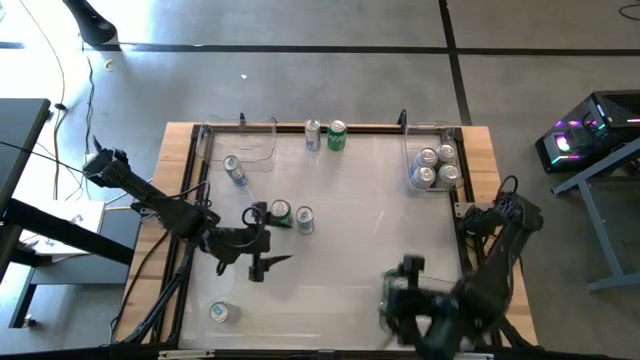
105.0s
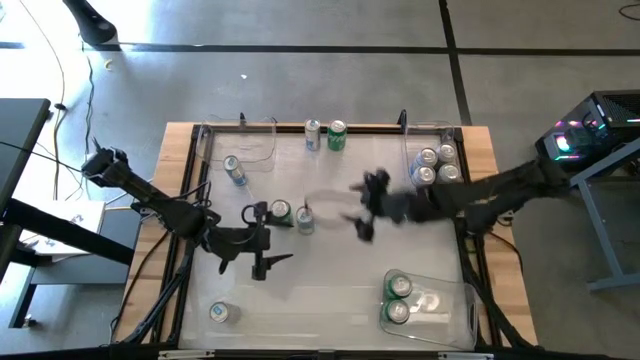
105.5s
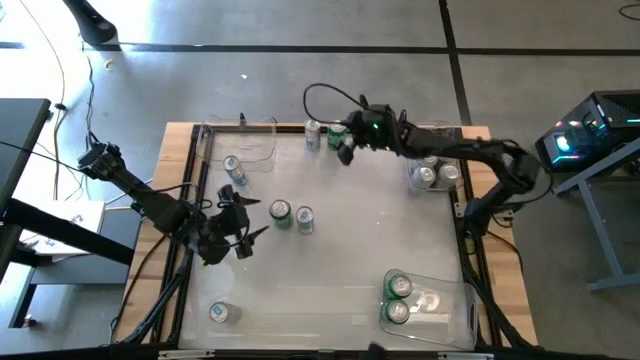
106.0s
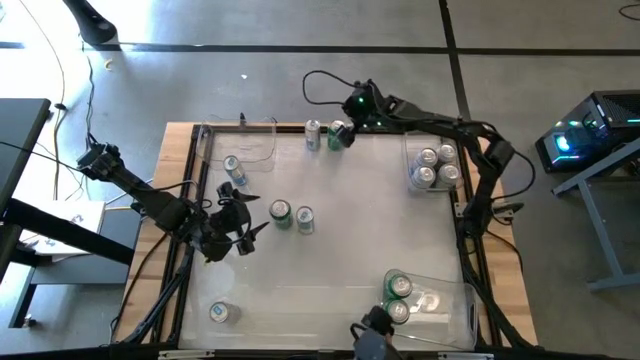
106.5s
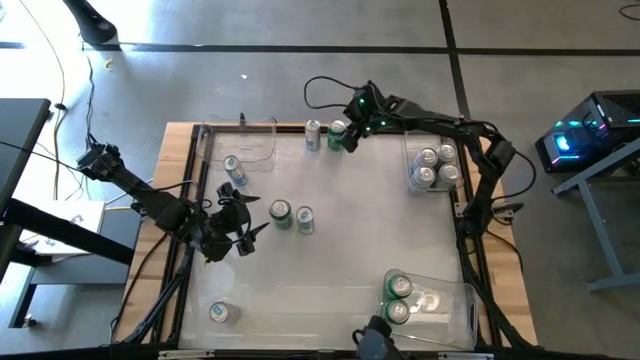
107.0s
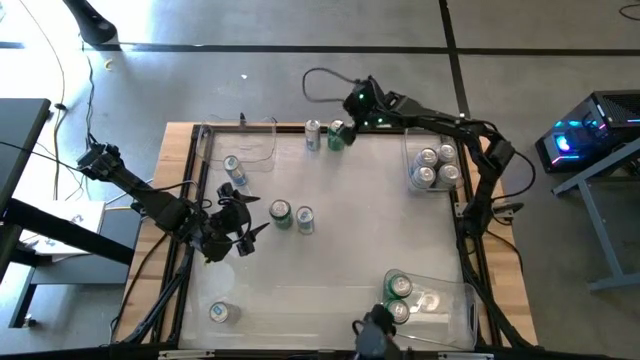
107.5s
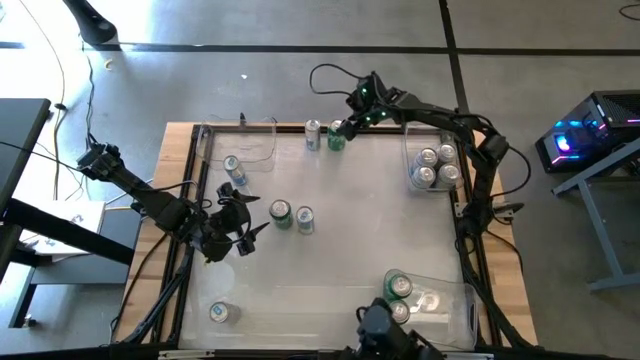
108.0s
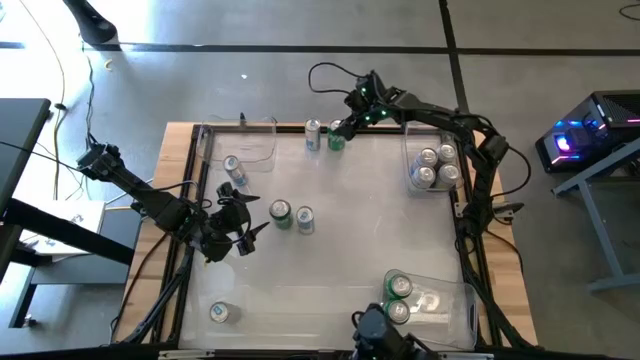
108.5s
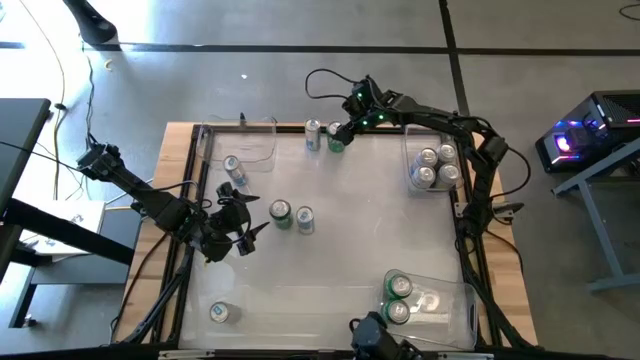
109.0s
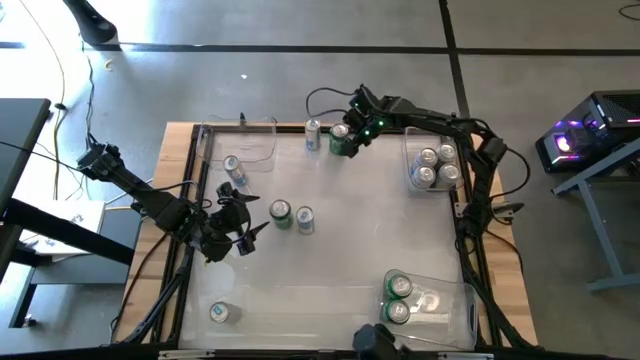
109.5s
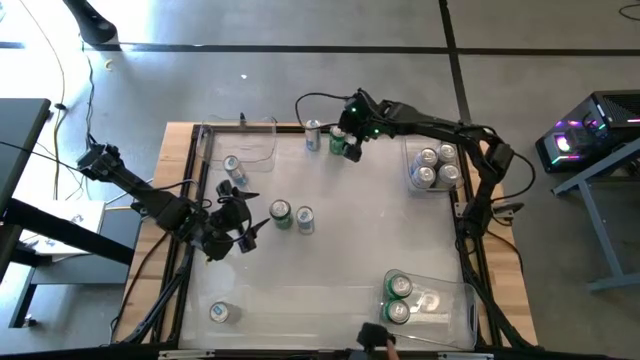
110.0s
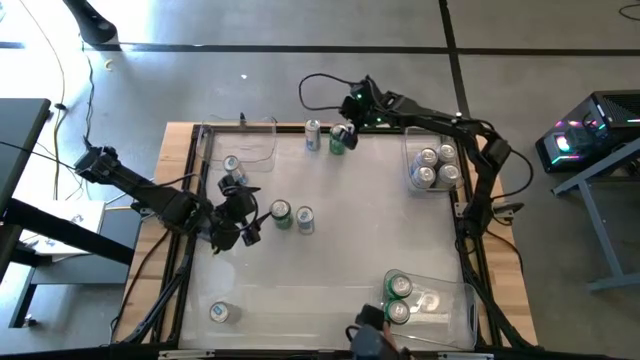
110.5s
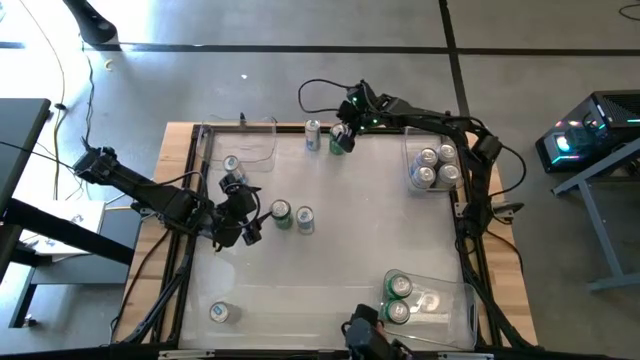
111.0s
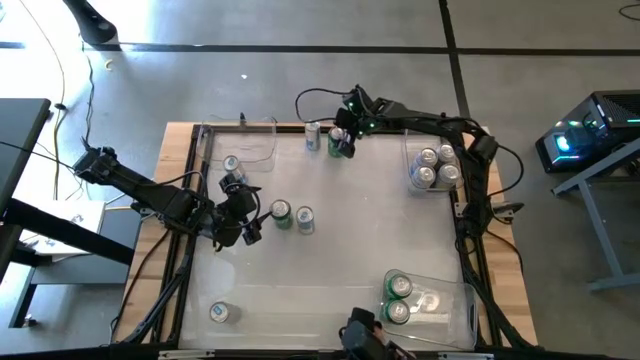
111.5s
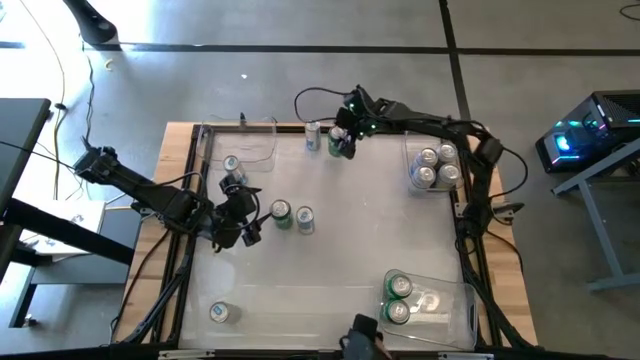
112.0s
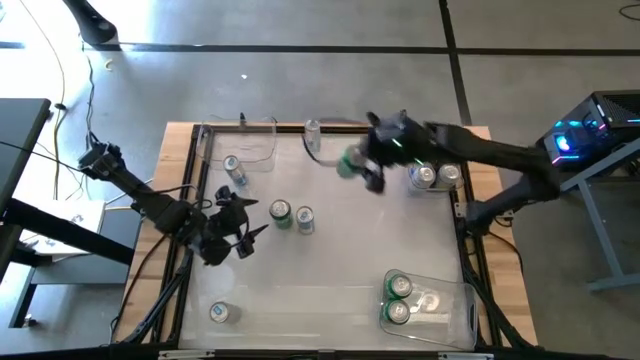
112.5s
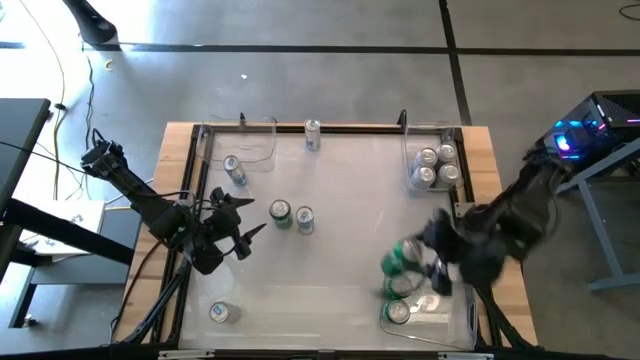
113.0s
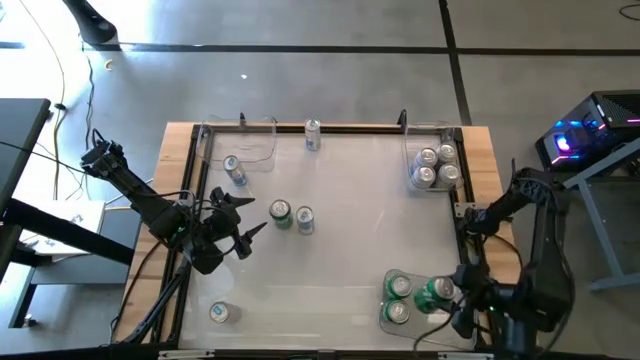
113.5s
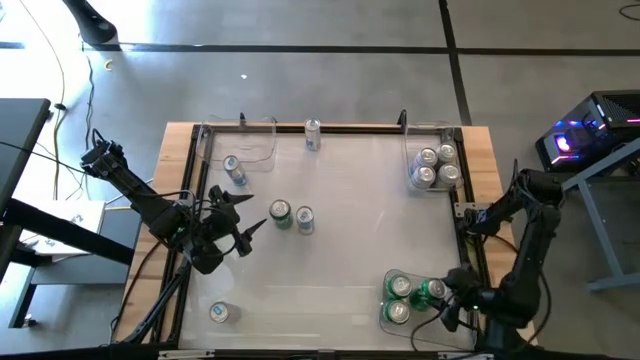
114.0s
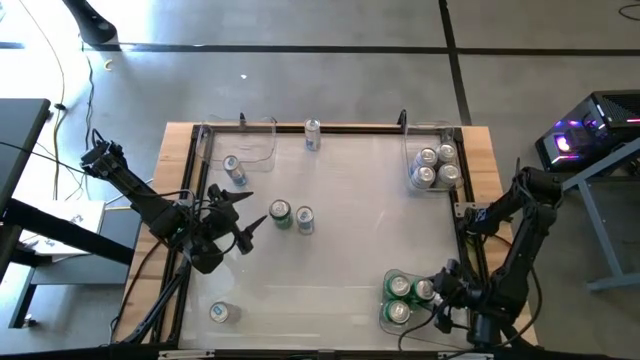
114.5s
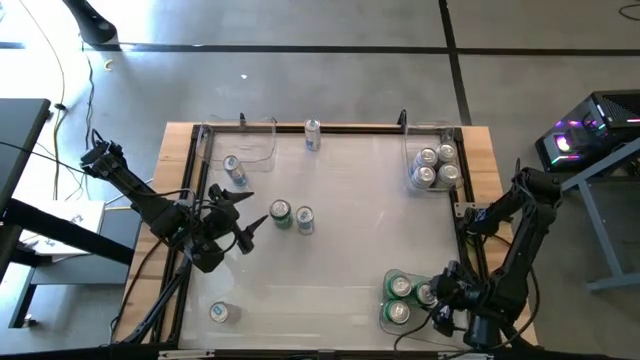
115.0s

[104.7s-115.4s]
Task: Sort soda cans
Put the top green soda can into the bottom transparent bin

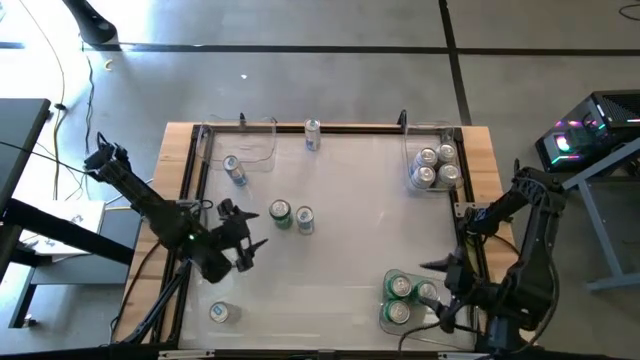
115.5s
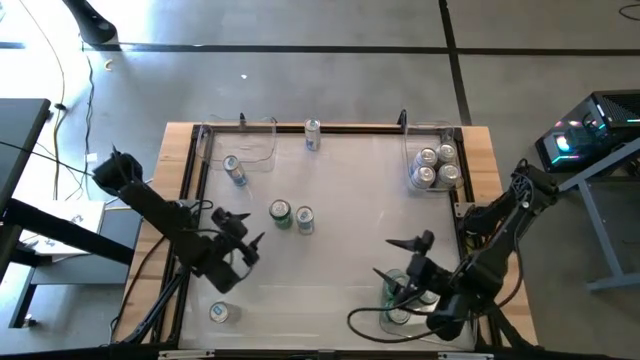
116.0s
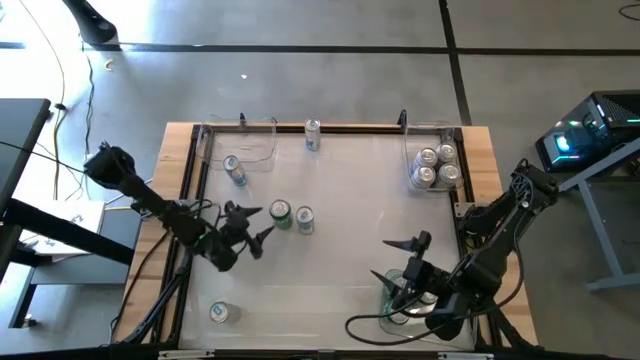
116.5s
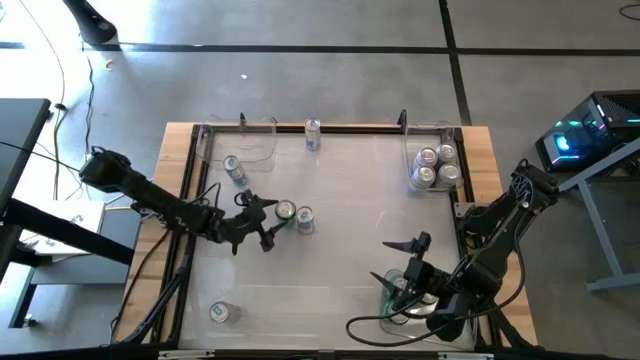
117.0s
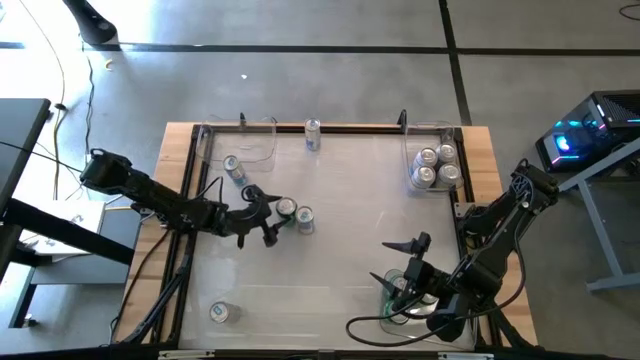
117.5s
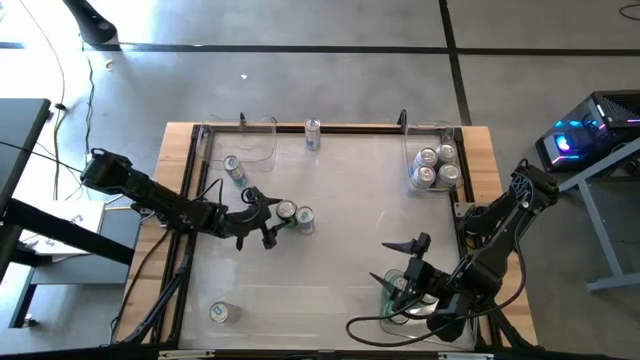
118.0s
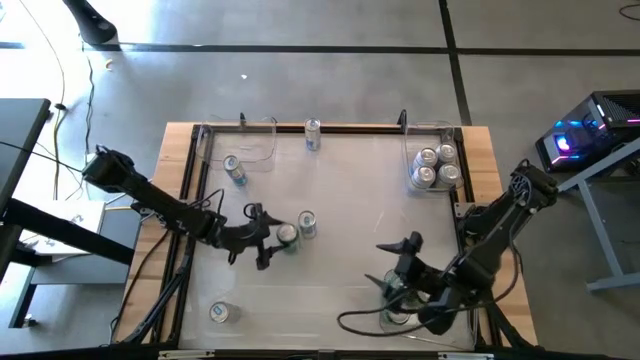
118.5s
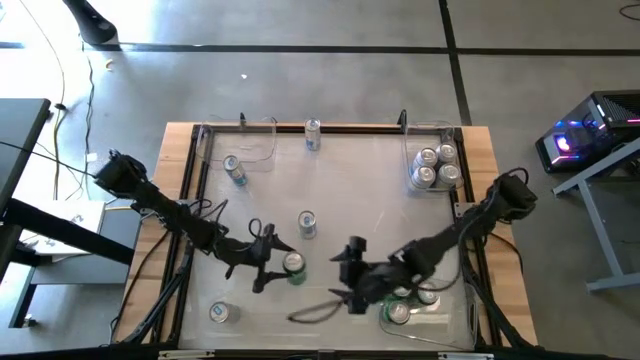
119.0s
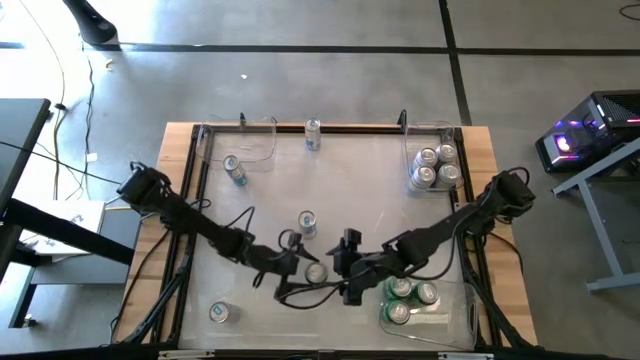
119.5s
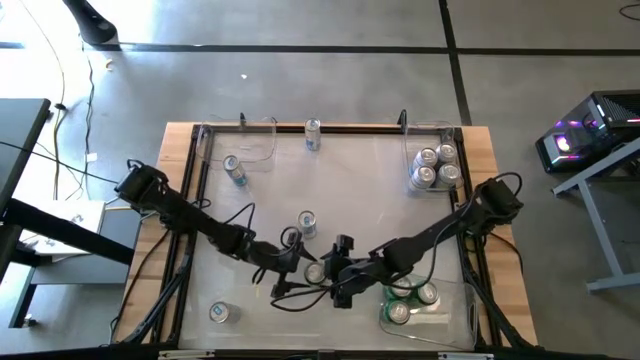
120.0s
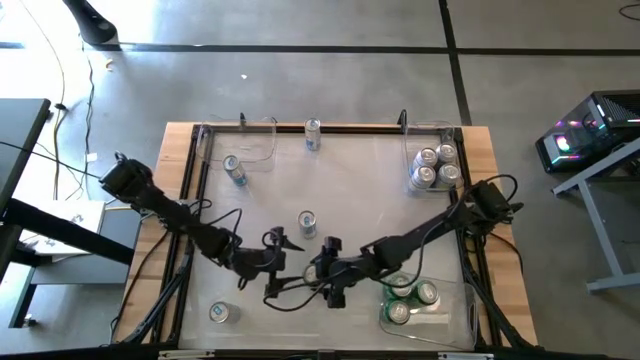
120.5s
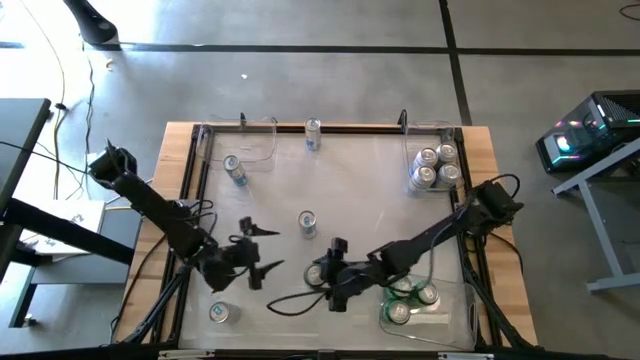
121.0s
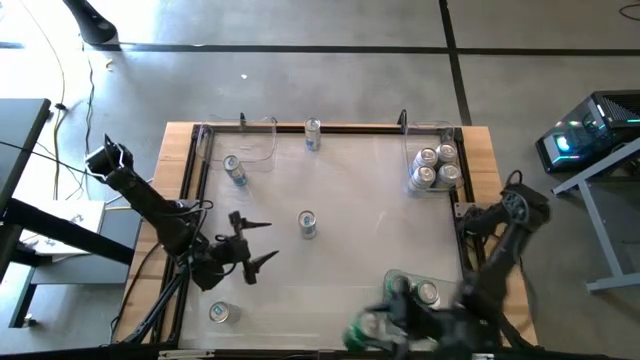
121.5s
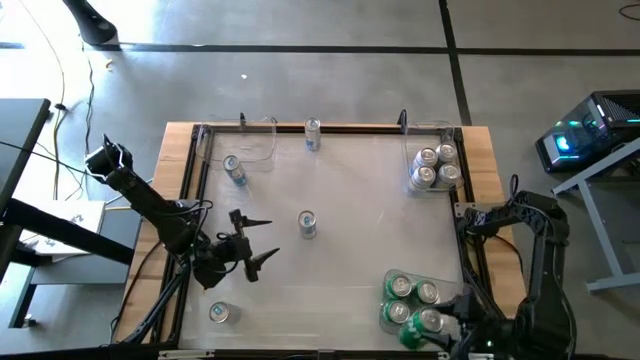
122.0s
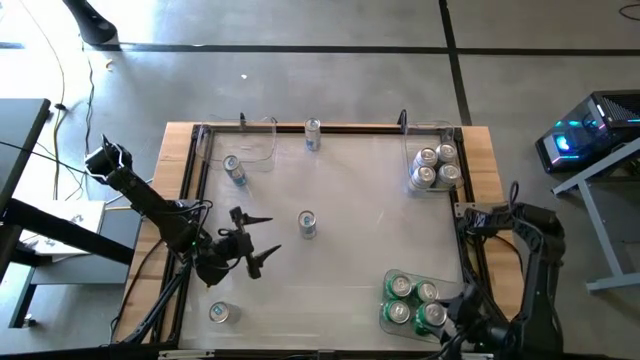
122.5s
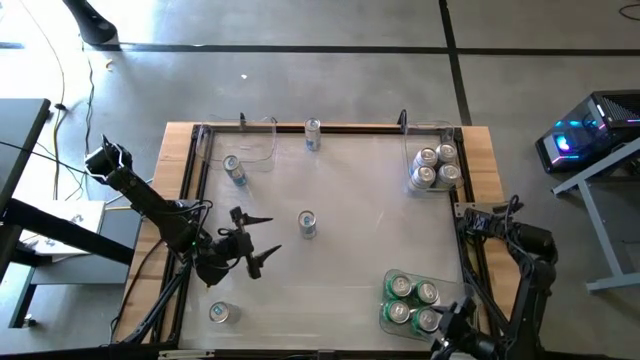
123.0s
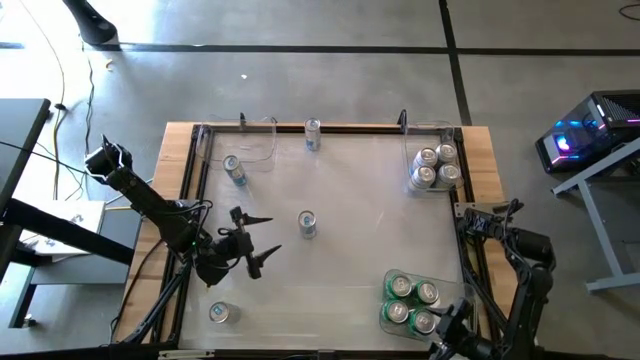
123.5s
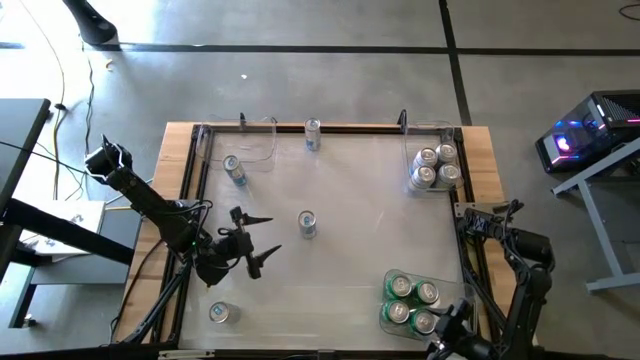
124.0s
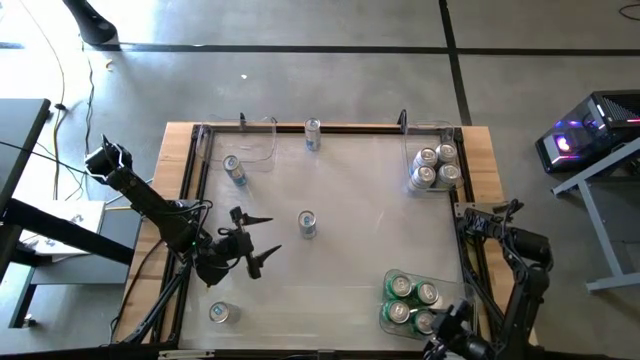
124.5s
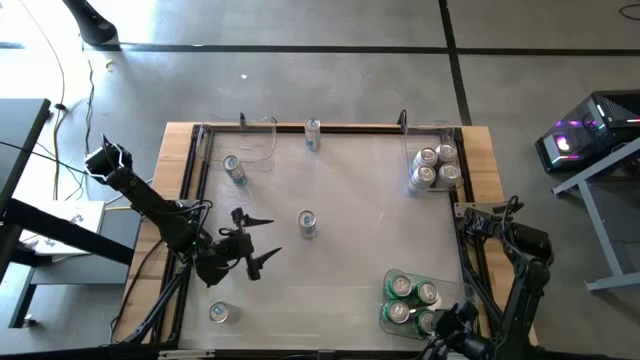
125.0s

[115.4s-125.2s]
Put the green soda can into the bottom transparent bin

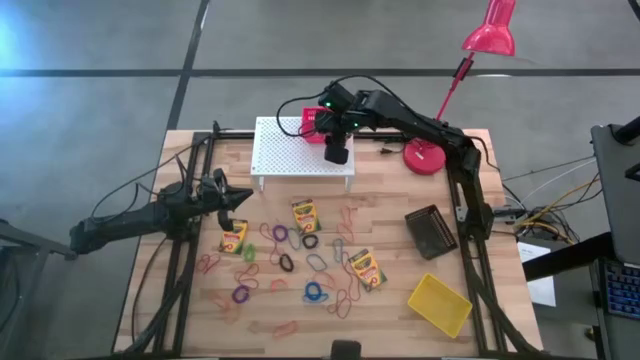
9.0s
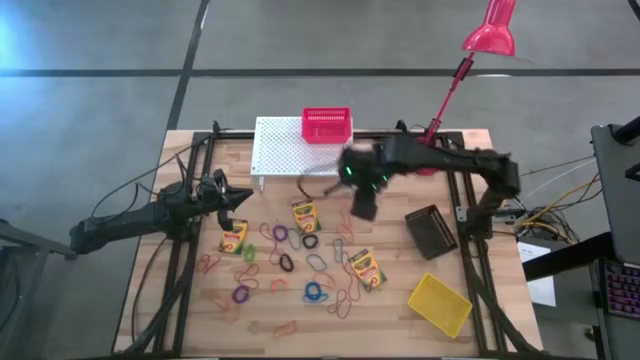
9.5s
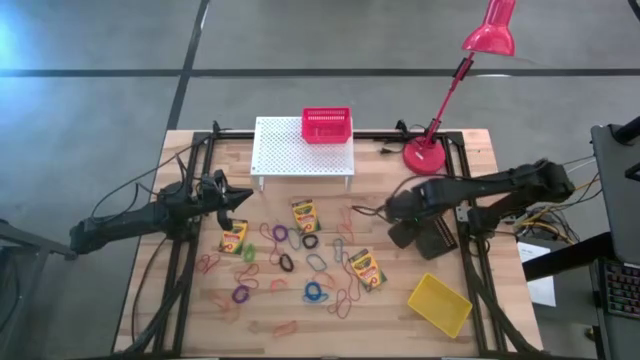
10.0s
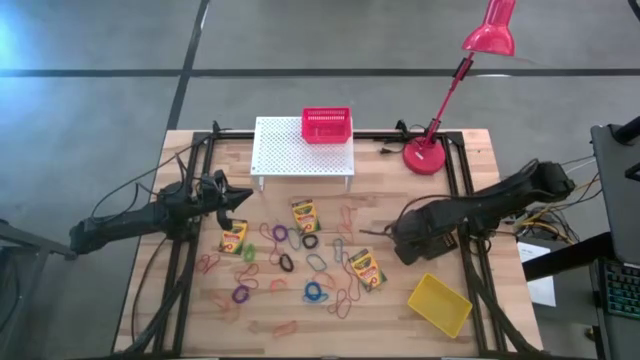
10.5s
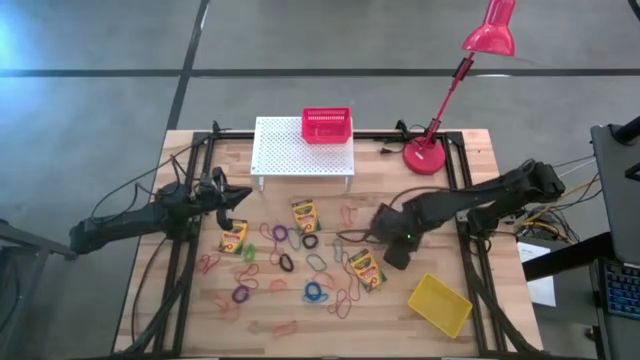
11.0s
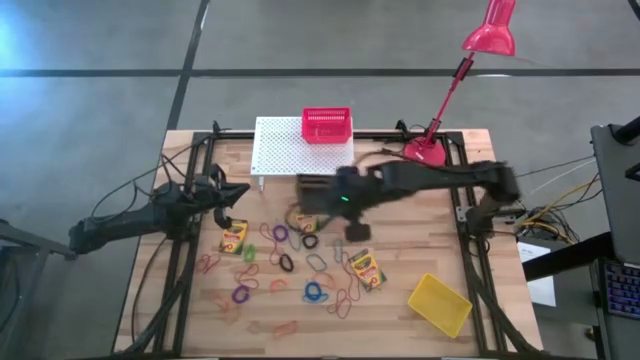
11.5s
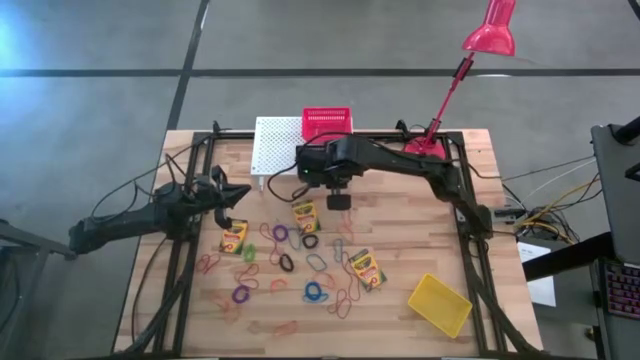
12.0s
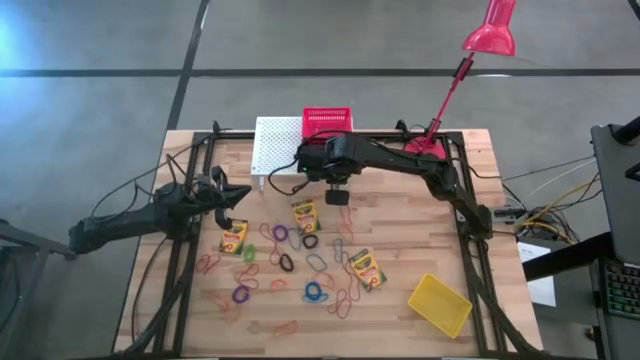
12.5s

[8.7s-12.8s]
Task: Pick & Place Office Desk Supplies
Put the black bin on the shelf
